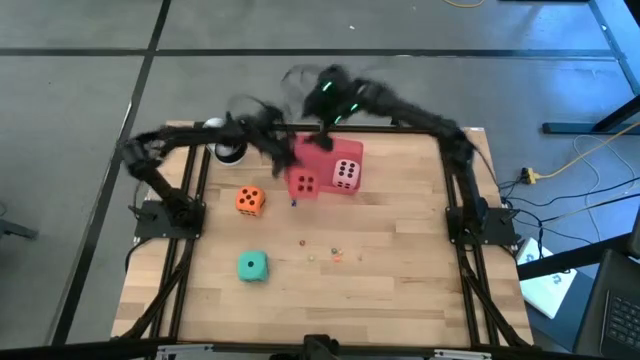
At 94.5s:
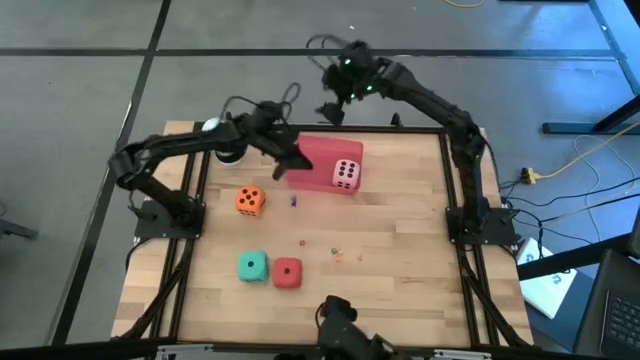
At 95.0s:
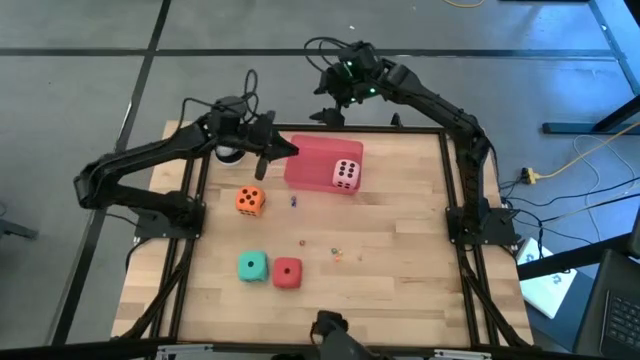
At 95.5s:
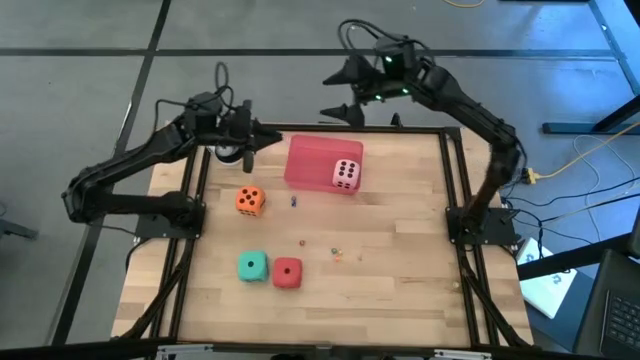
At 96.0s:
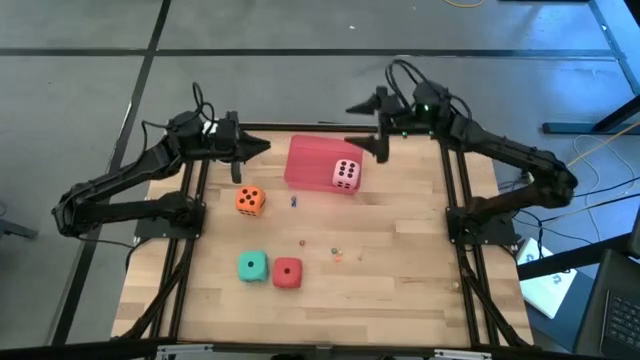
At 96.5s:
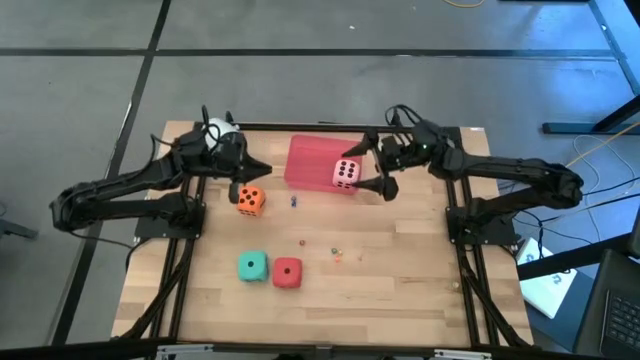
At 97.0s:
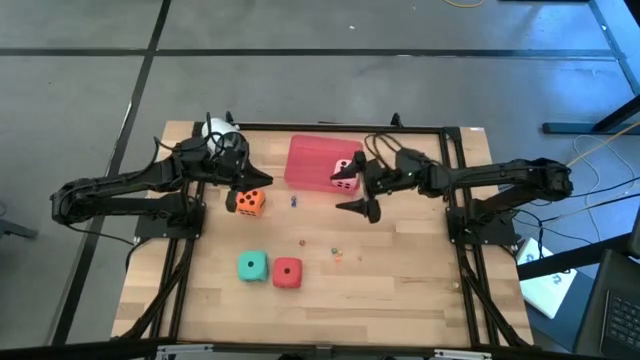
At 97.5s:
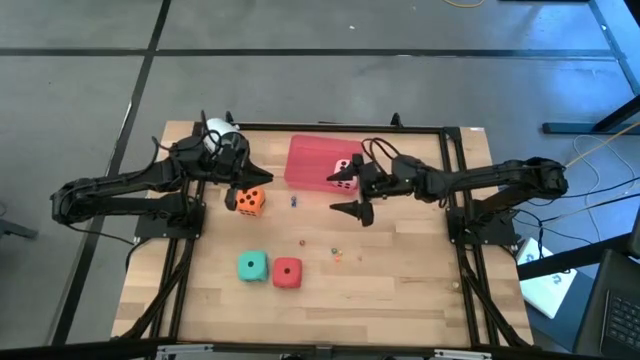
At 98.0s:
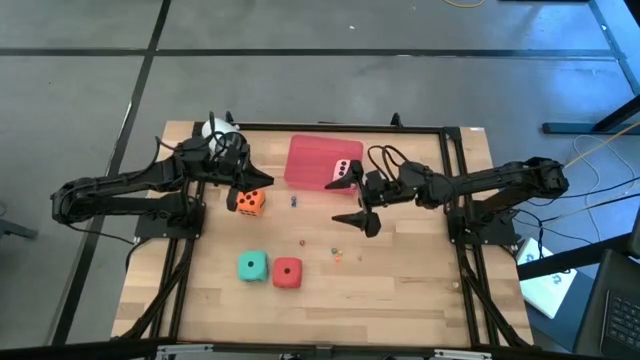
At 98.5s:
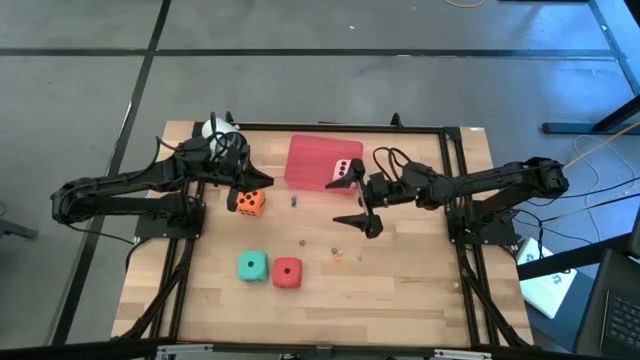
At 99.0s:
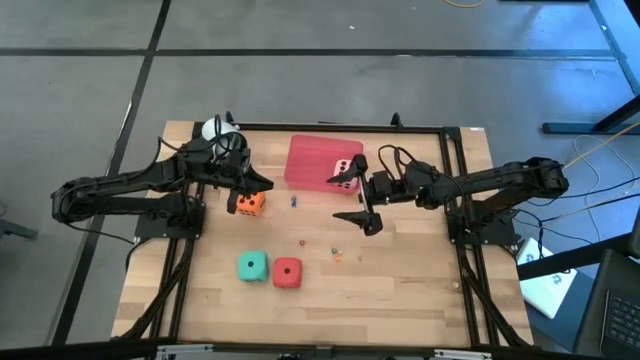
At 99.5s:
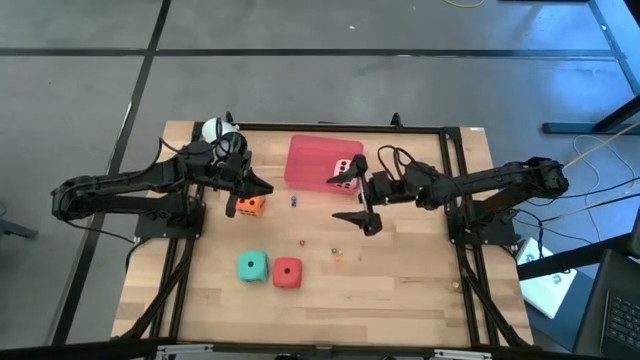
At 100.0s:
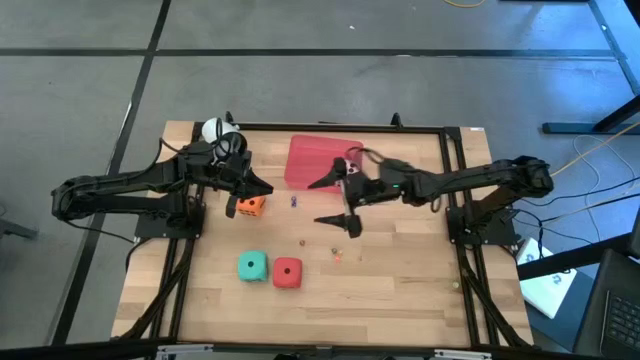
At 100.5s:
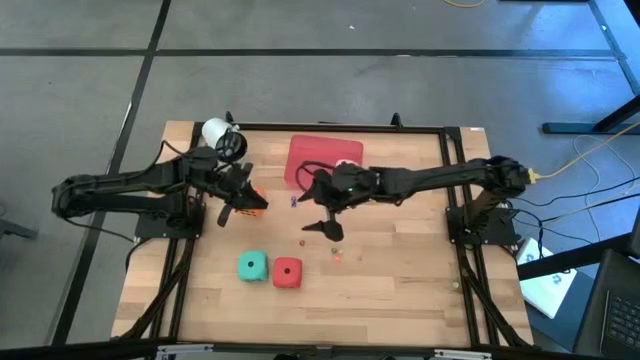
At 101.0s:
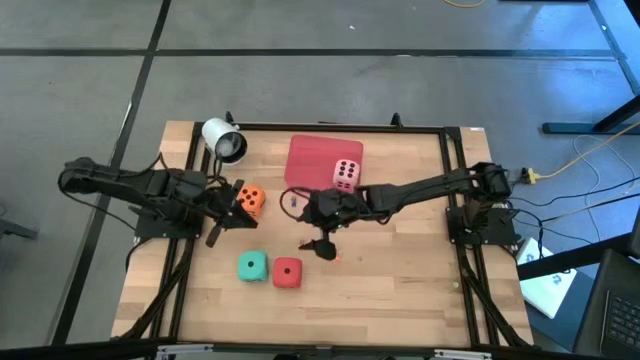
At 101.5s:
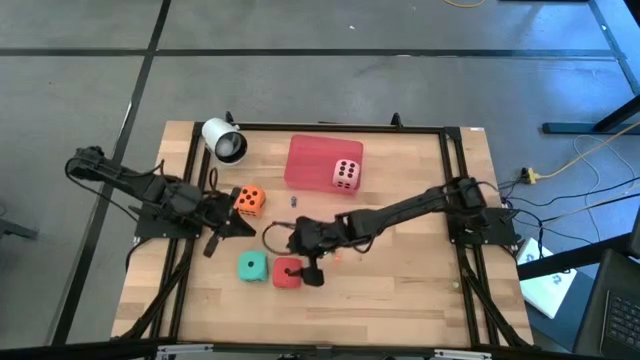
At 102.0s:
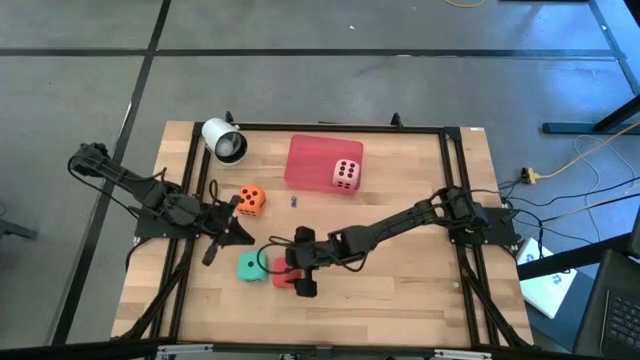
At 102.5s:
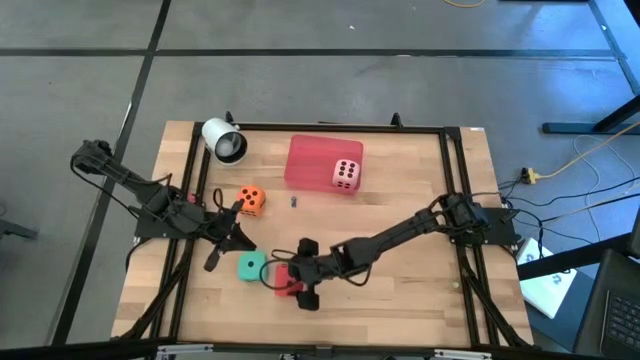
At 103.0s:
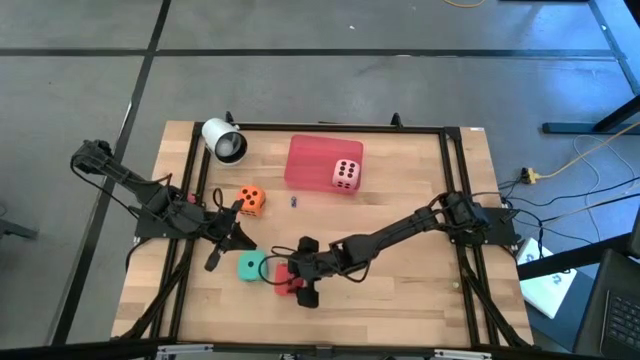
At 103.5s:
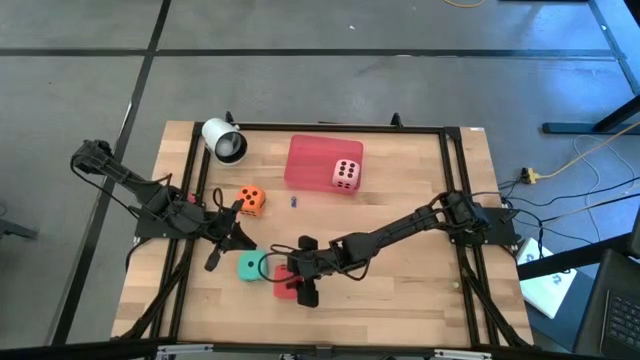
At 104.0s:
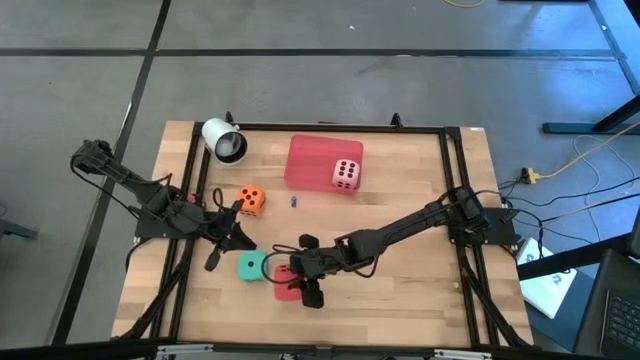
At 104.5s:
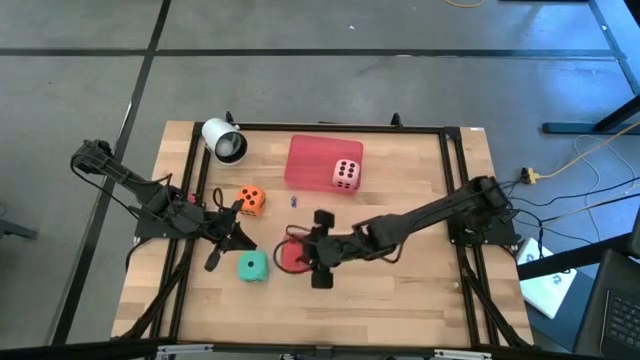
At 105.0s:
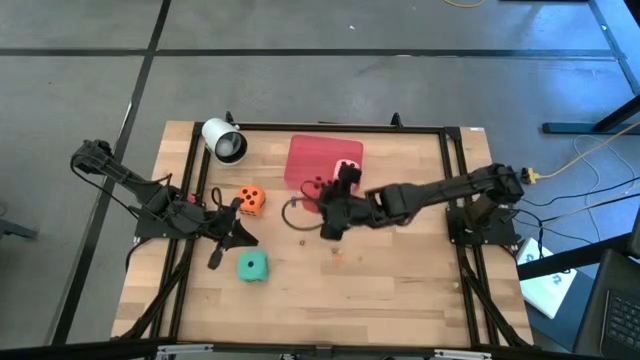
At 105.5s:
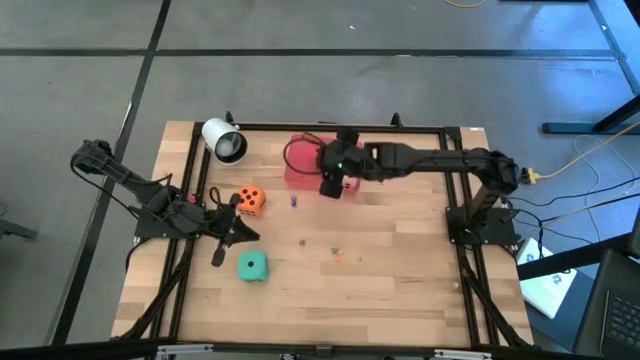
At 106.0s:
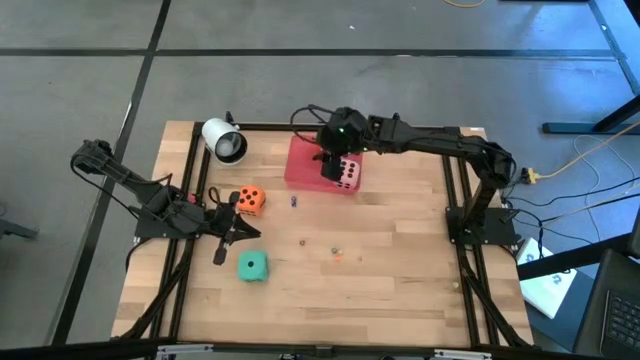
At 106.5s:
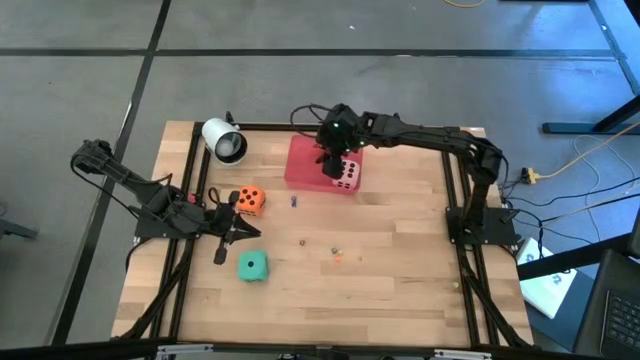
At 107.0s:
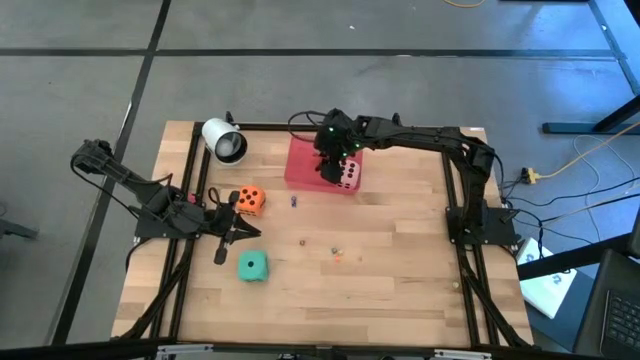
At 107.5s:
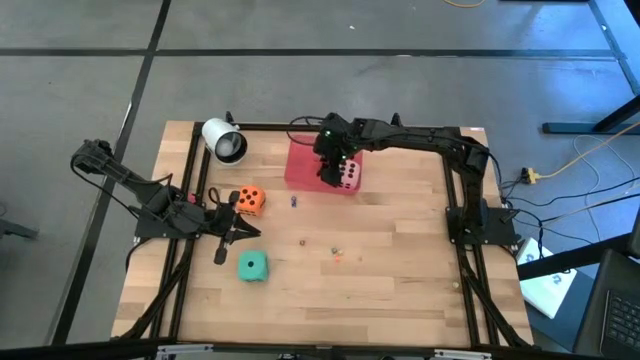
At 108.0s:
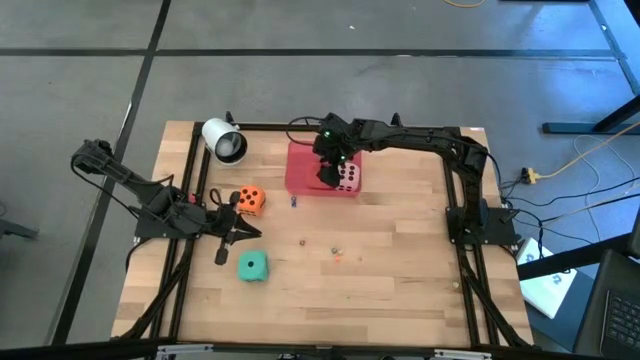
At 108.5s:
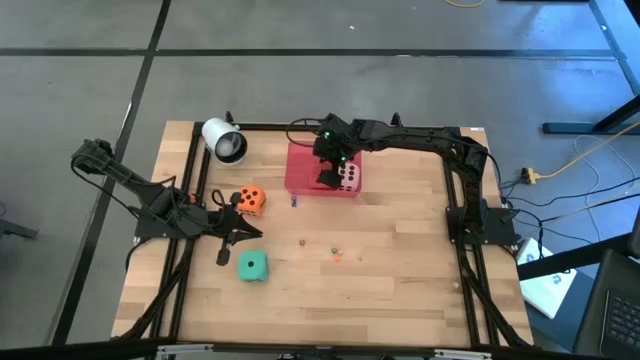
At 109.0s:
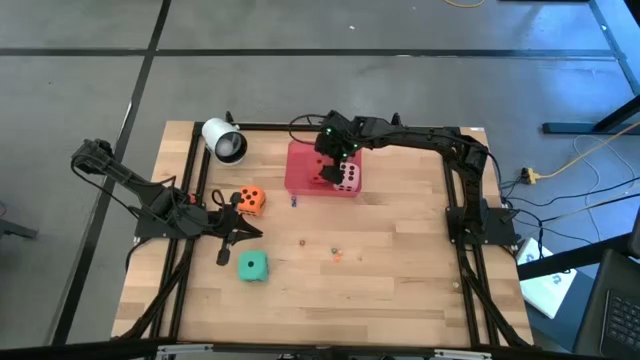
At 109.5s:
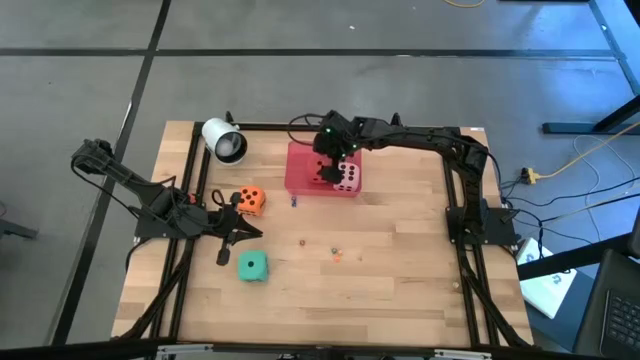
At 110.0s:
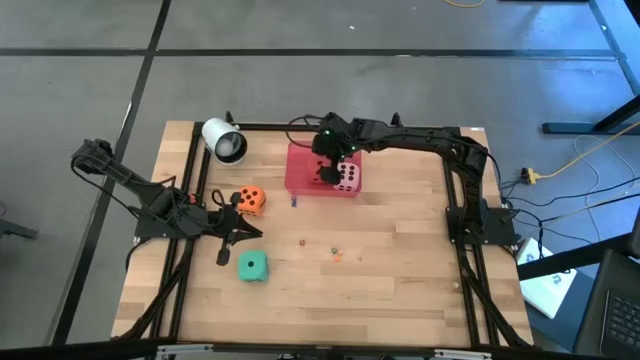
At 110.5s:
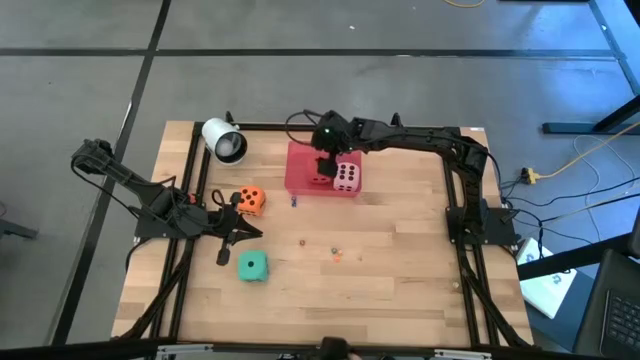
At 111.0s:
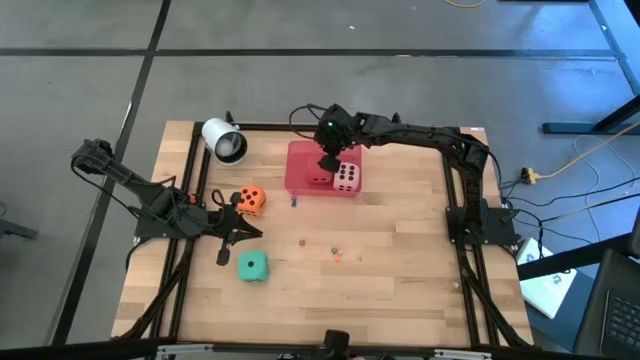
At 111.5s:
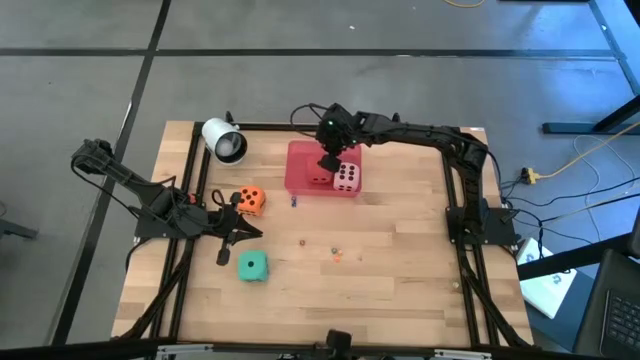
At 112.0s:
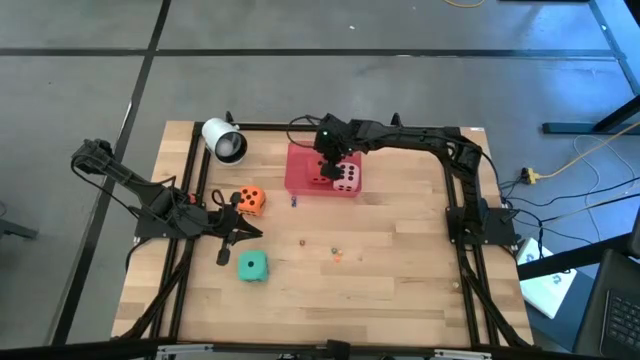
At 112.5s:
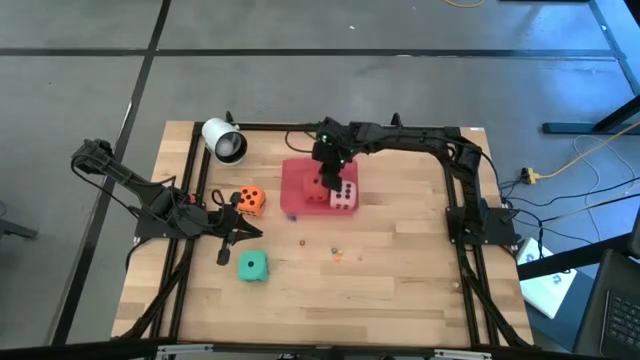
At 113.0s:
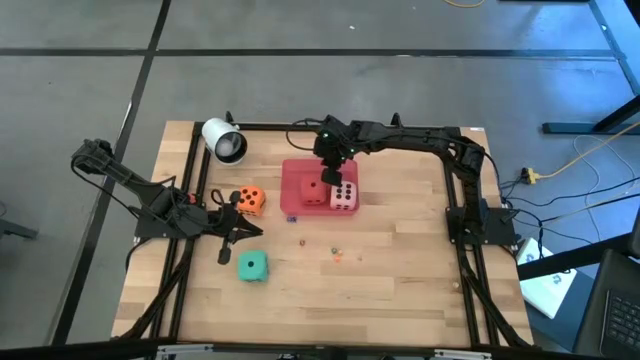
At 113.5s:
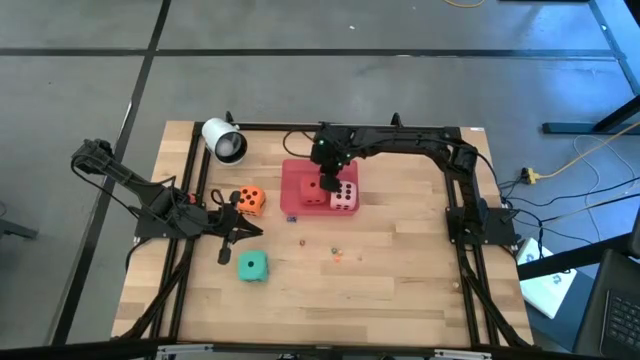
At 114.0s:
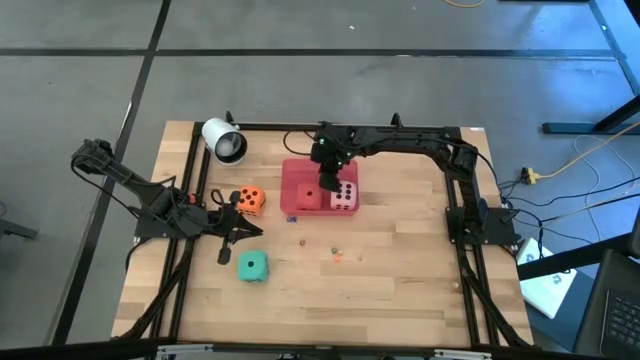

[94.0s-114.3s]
Task: Pick & Place Dice
Put the big red dice into the pink bin

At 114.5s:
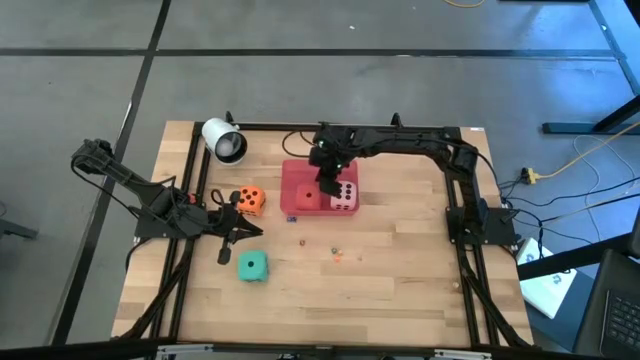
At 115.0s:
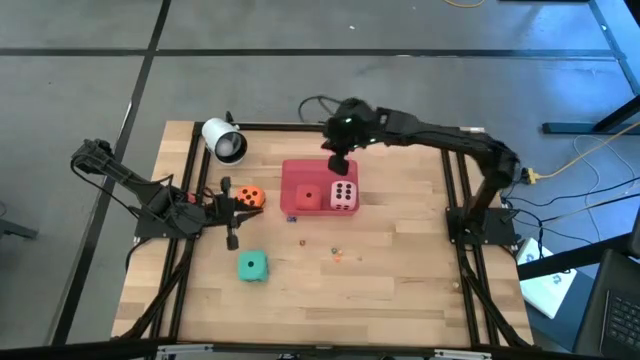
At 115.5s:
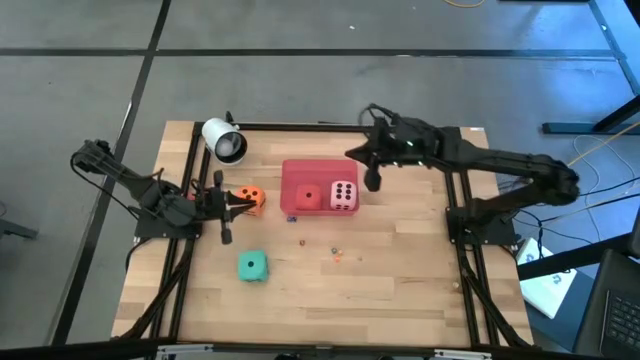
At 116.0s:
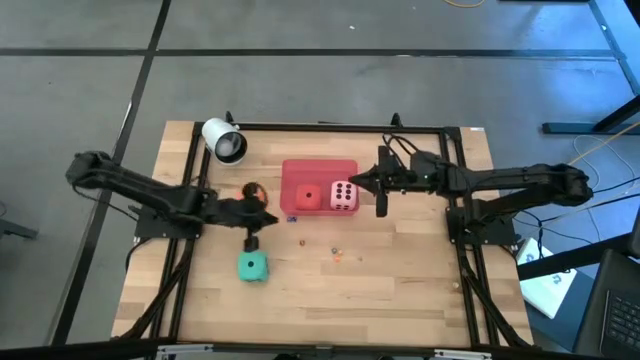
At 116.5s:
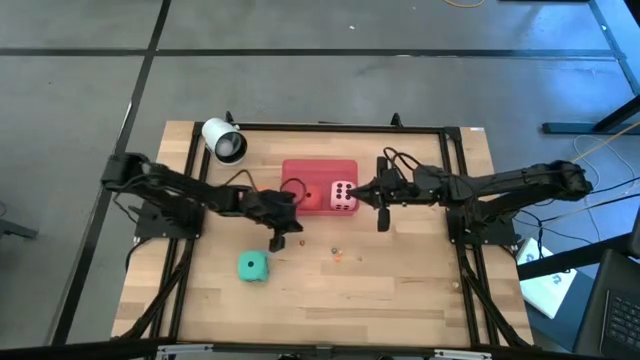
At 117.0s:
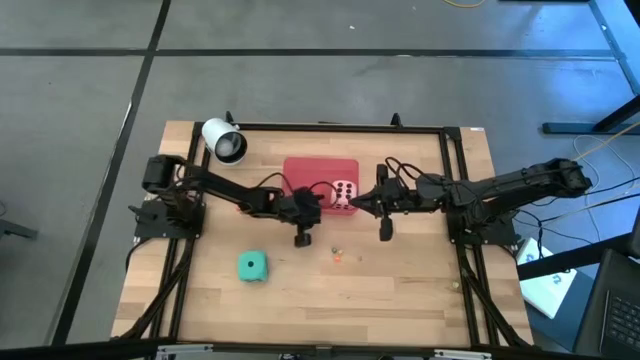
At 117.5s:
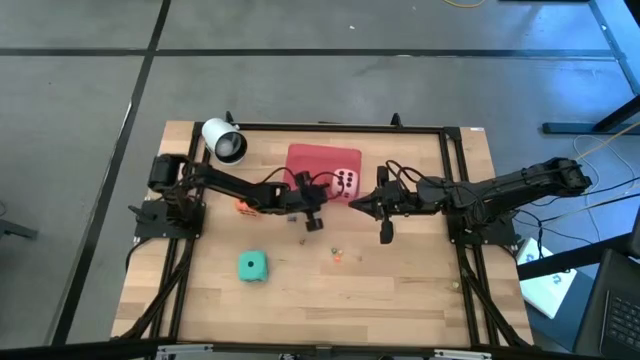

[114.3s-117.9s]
Adjust the bin to the top of the table
